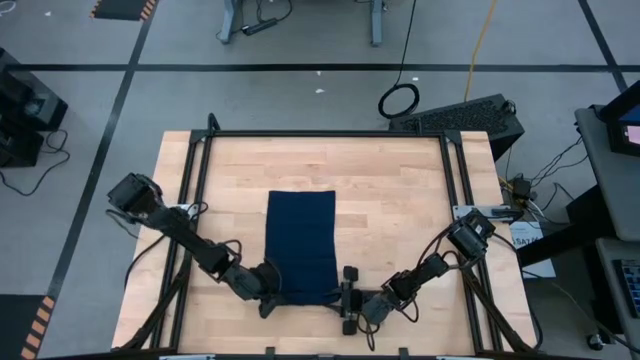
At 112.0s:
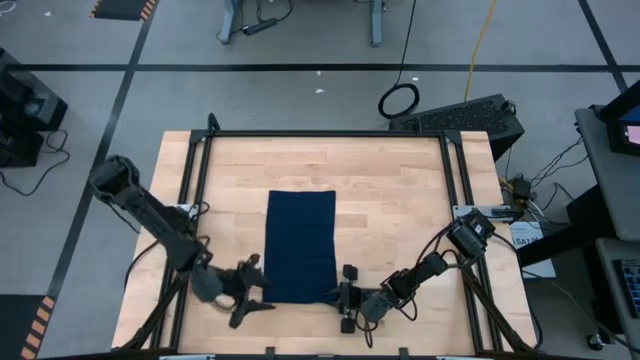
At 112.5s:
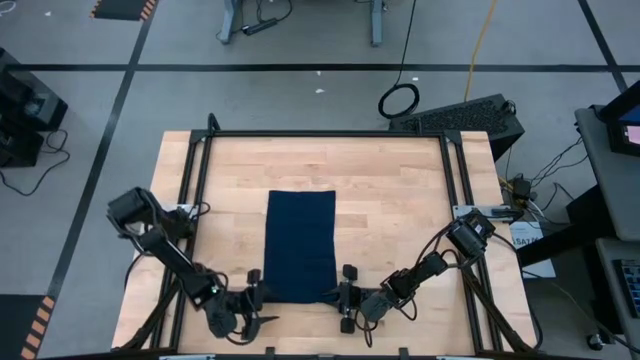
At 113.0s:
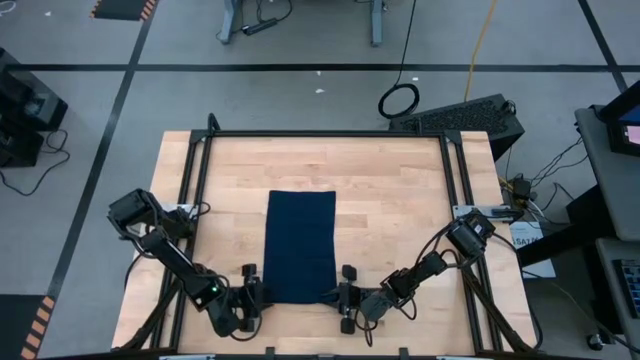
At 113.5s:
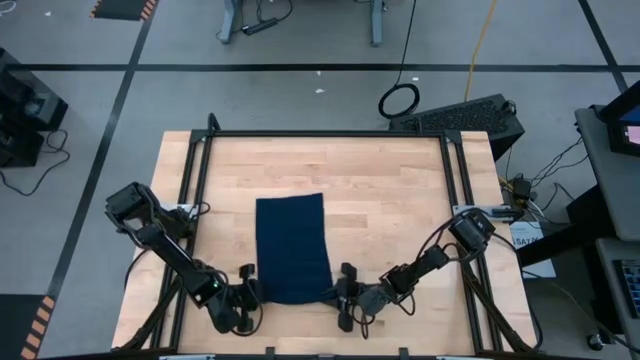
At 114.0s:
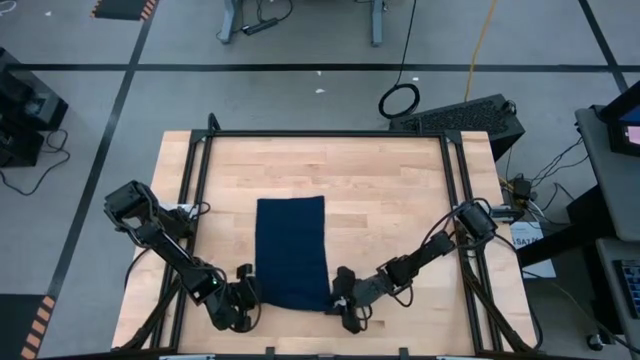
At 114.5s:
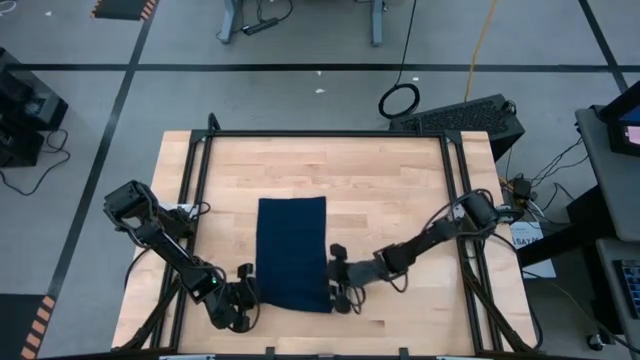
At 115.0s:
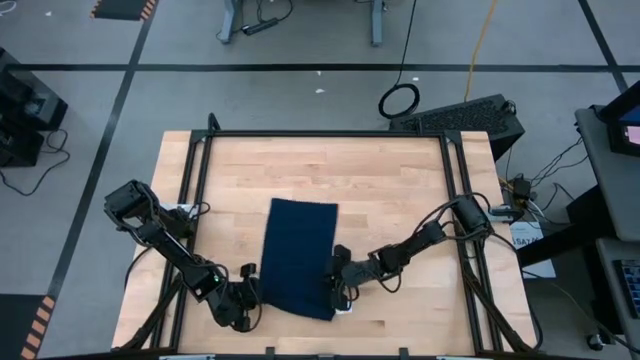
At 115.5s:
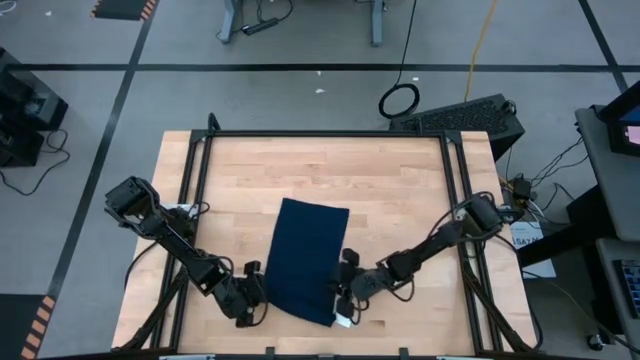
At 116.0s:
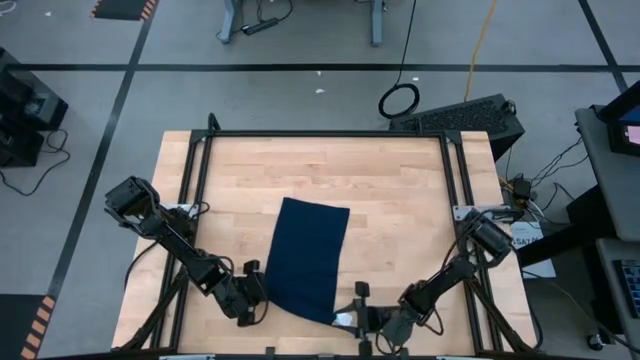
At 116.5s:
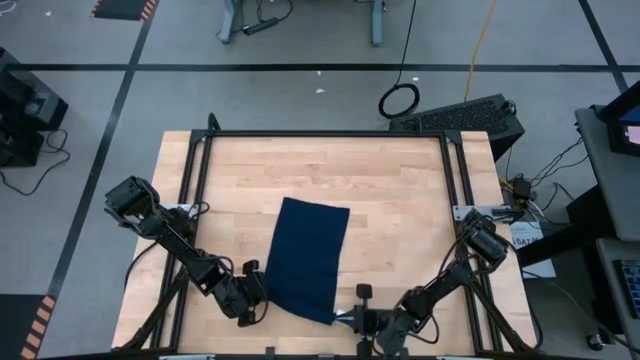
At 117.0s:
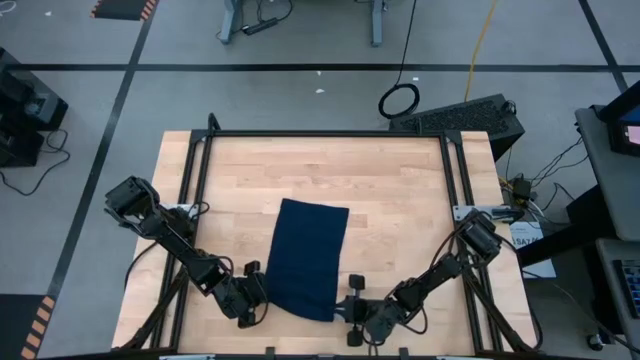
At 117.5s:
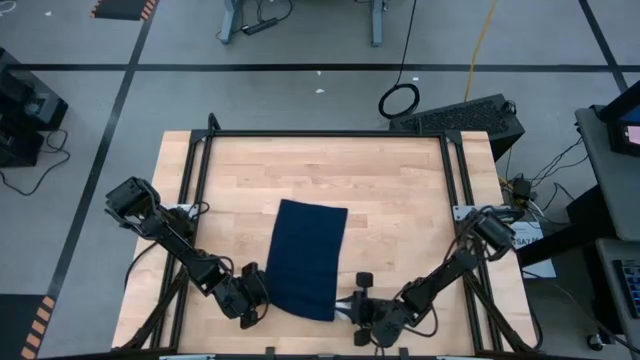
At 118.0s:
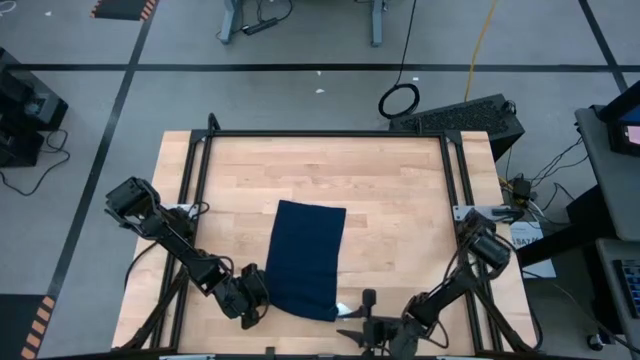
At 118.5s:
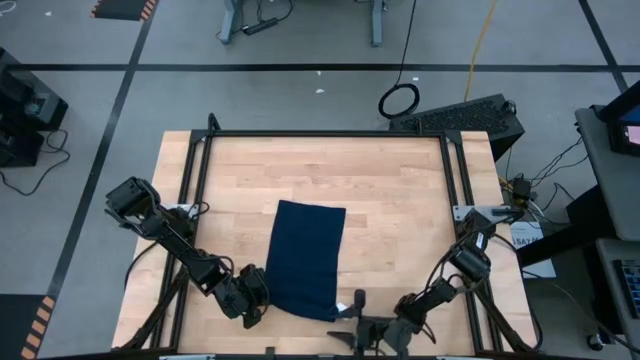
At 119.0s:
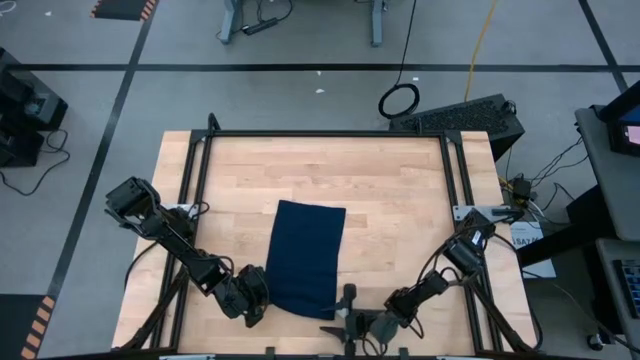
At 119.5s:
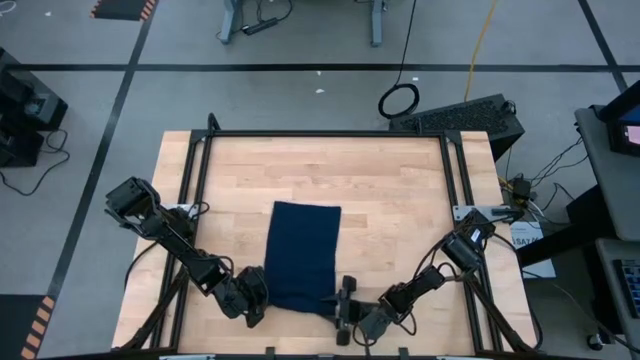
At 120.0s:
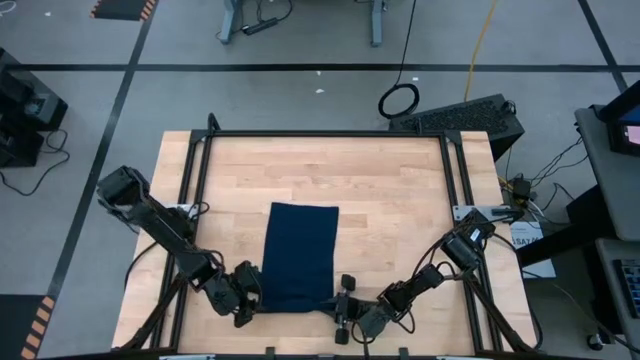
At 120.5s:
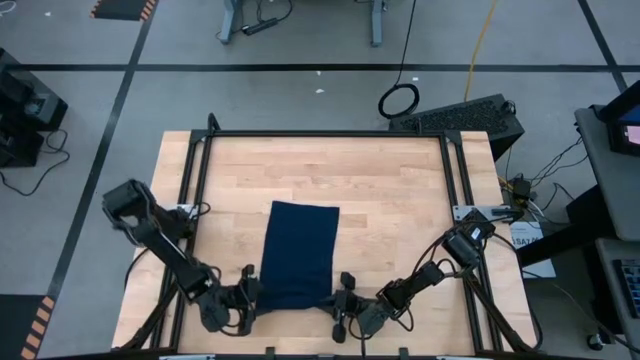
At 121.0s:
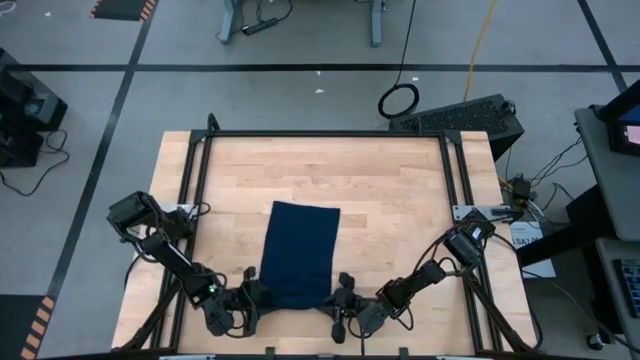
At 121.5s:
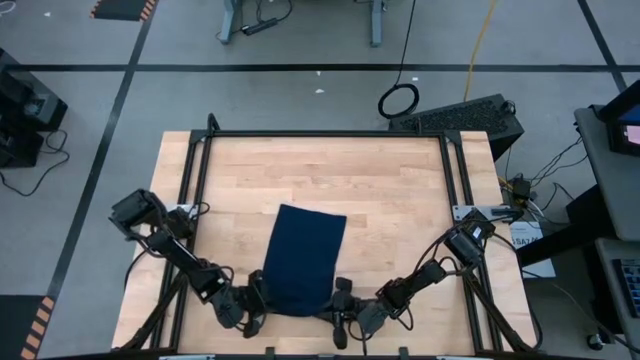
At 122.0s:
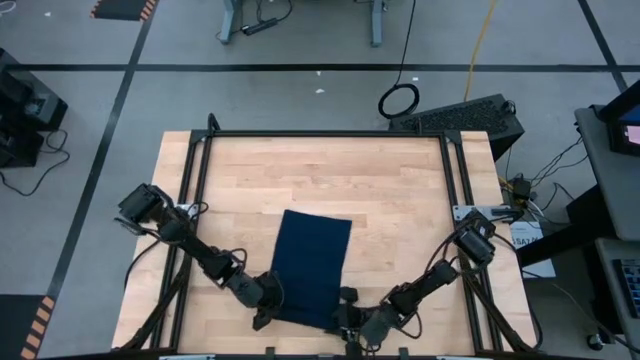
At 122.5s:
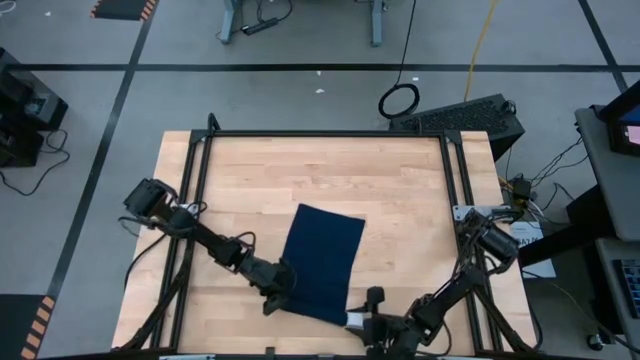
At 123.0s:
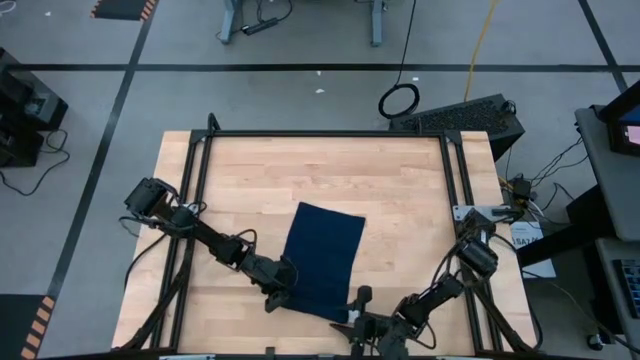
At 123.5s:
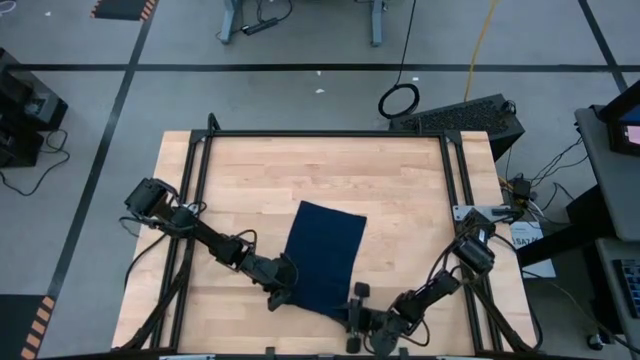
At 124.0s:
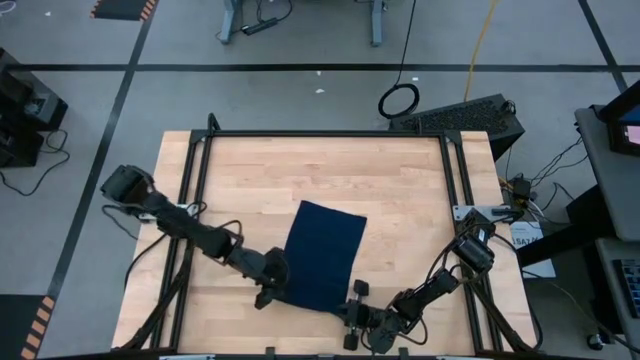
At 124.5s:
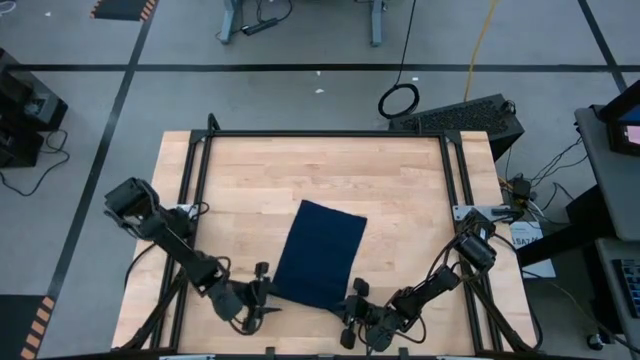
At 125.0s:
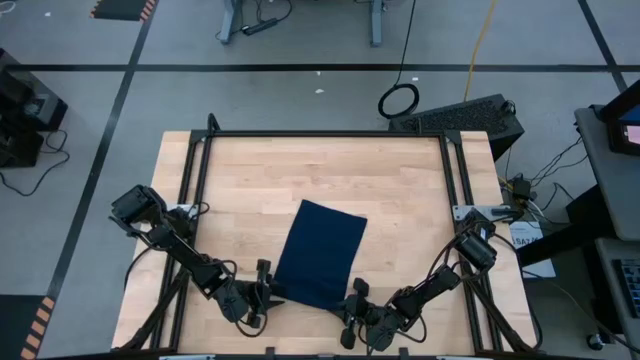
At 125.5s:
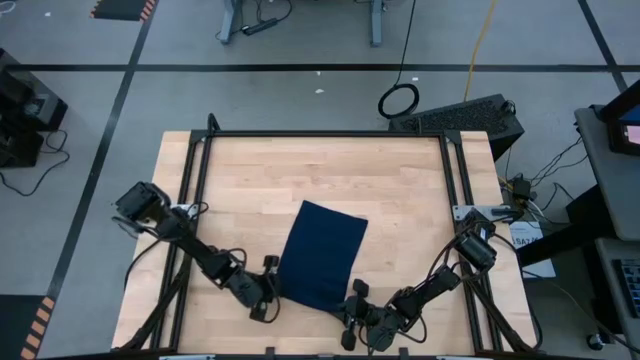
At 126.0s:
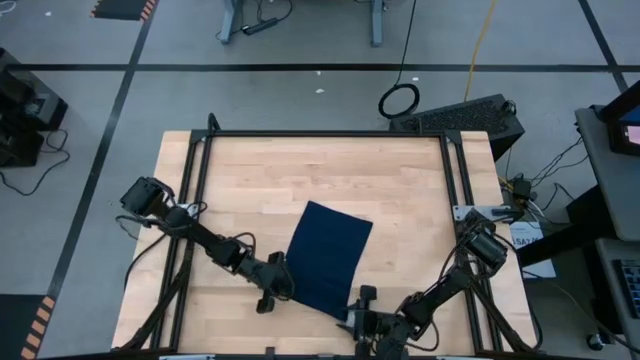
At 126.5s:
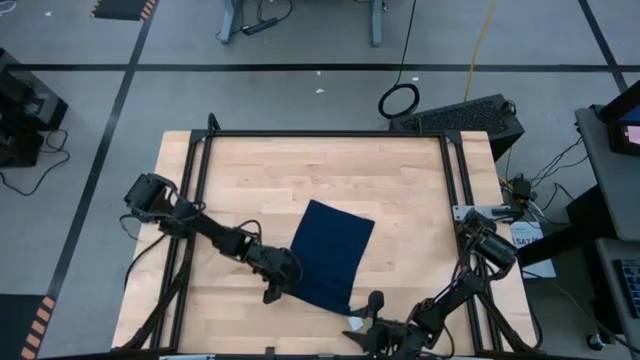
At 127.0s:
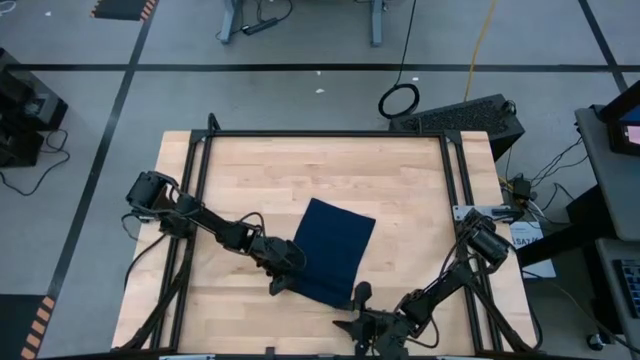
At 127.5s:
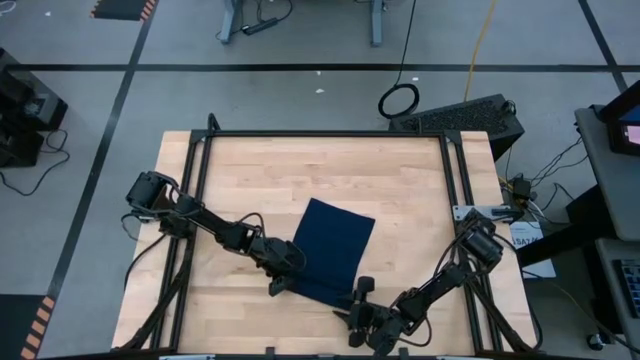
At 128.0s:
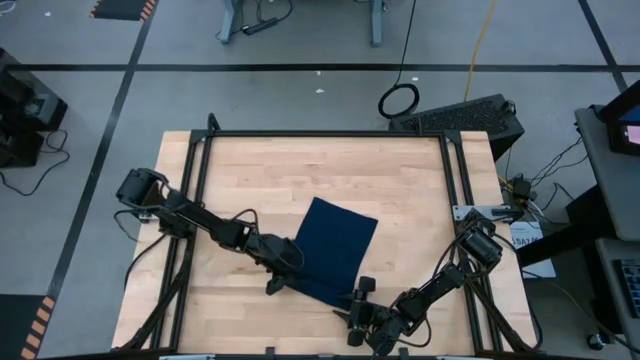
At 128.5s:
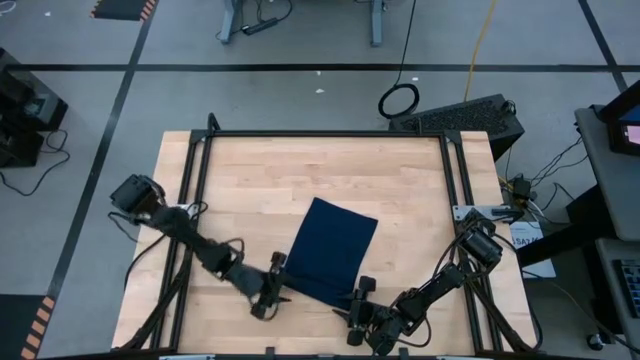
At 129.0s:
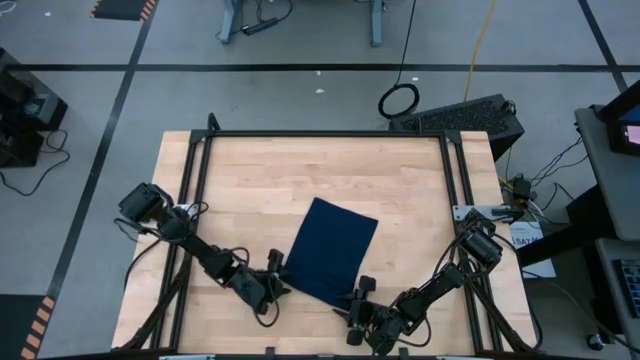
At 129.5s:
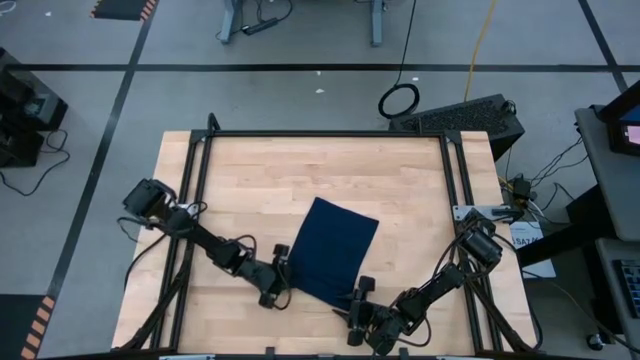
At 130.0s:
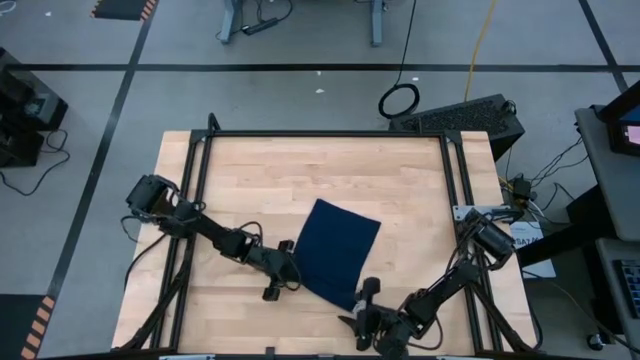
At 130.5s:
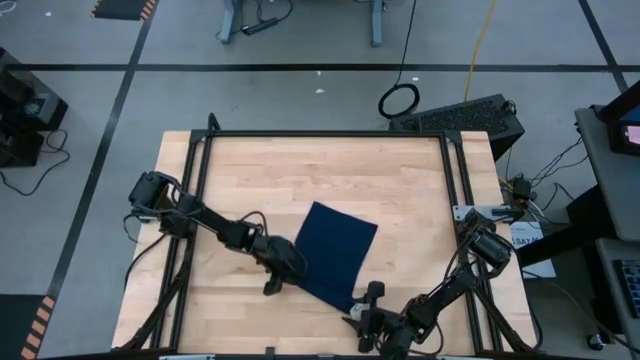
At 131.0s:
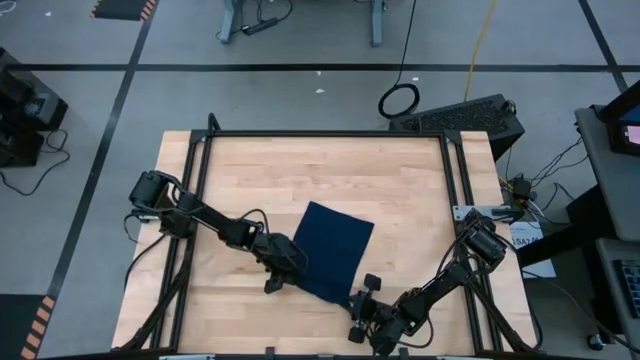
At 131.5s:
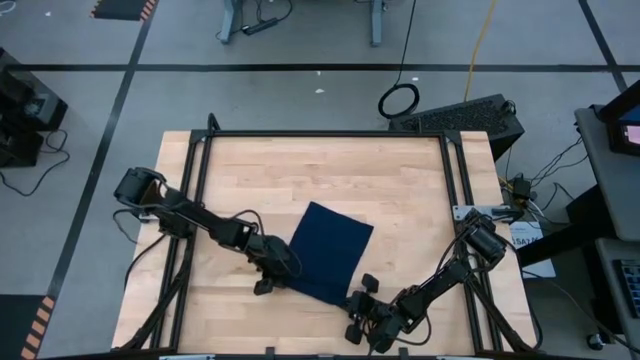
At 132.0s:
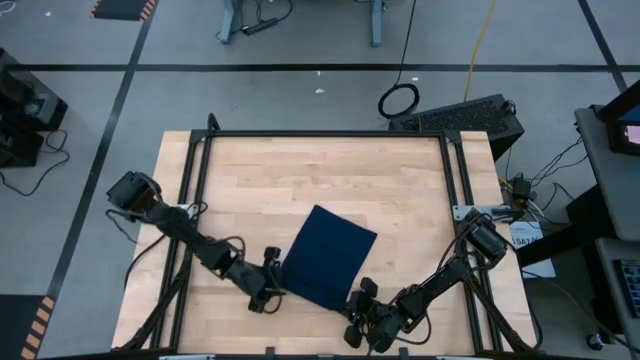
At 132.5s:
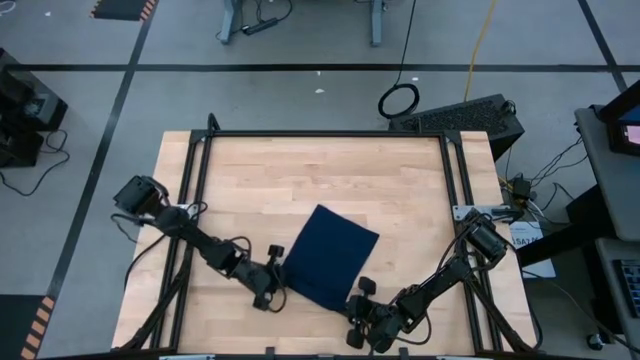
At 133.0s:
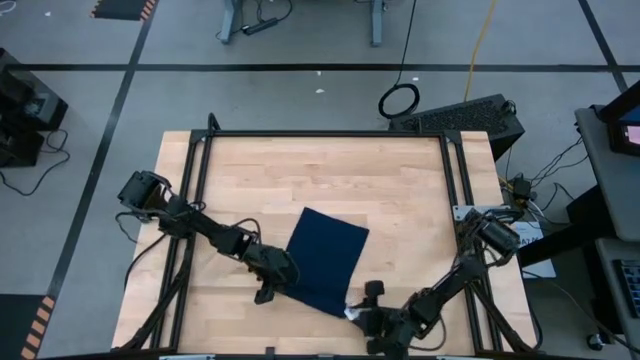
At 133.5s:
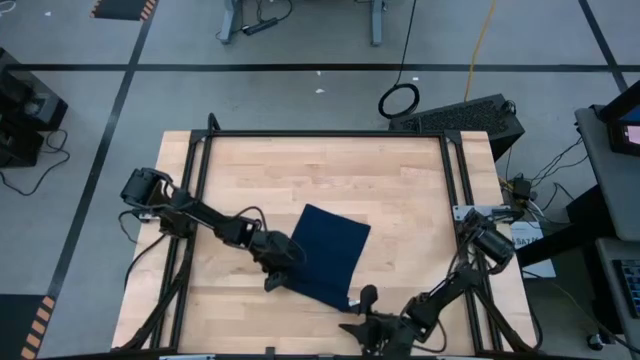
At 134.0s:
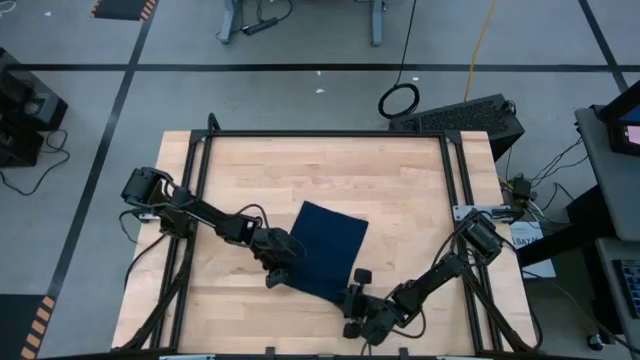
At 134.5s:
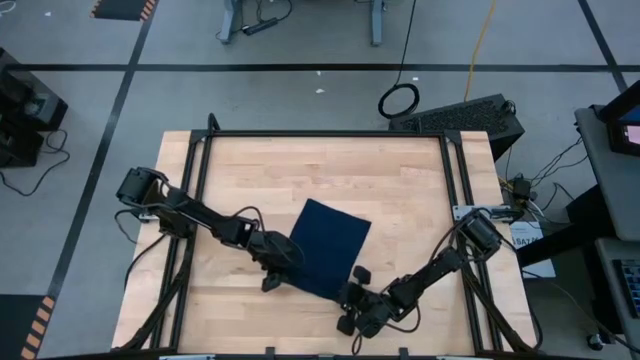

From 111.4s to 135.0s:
Task: Roll towel
Roll the dark blue towel
